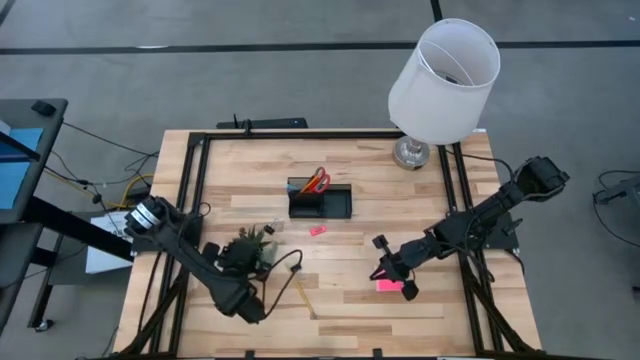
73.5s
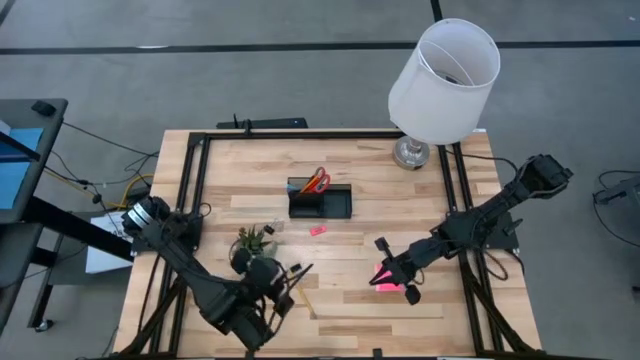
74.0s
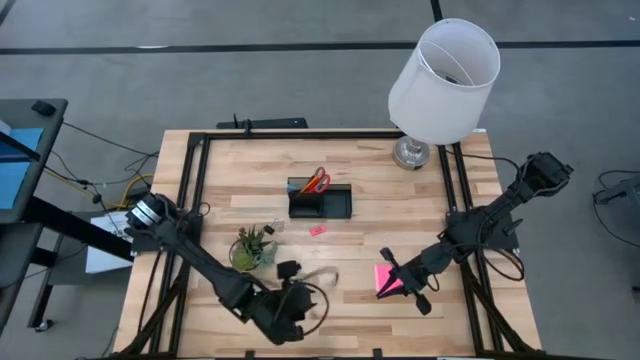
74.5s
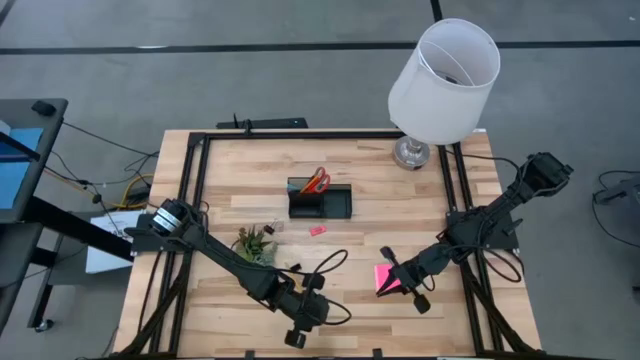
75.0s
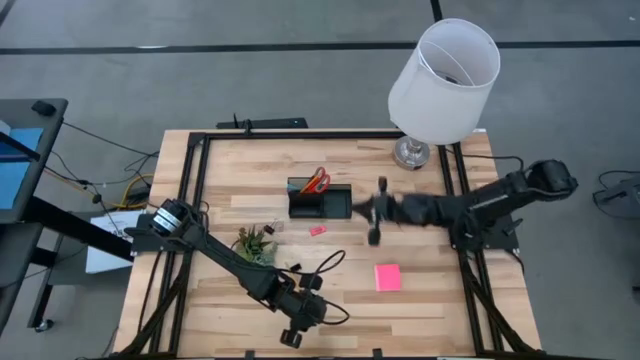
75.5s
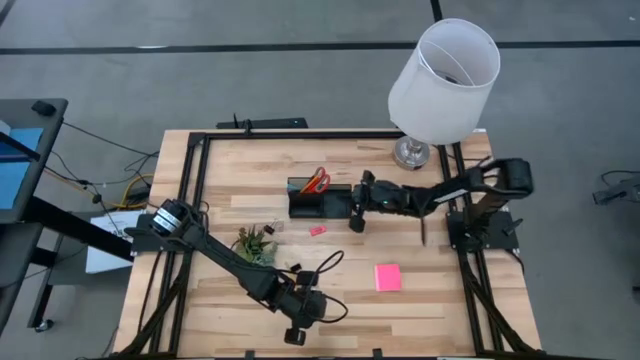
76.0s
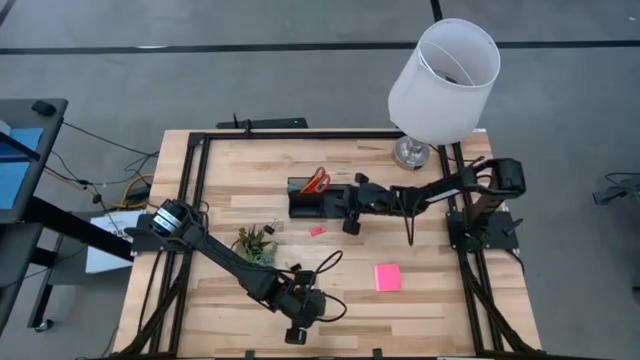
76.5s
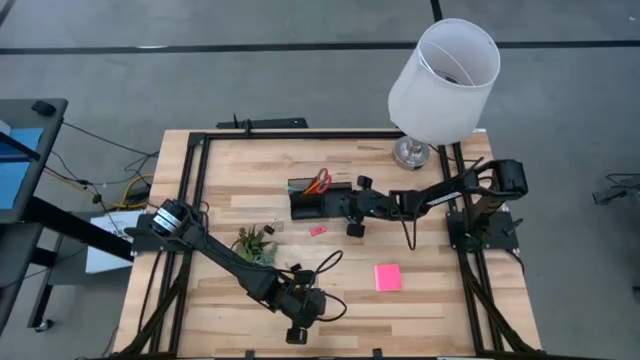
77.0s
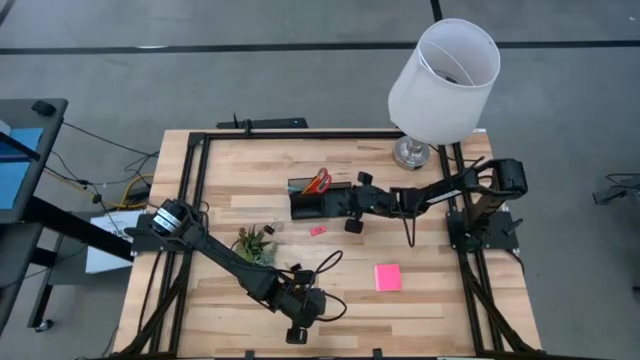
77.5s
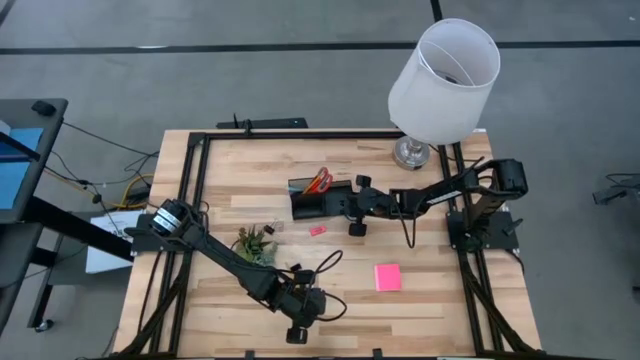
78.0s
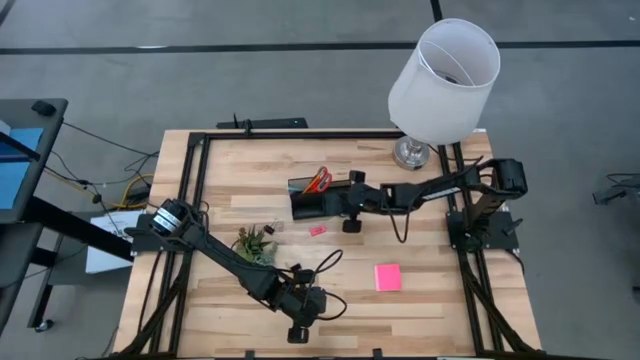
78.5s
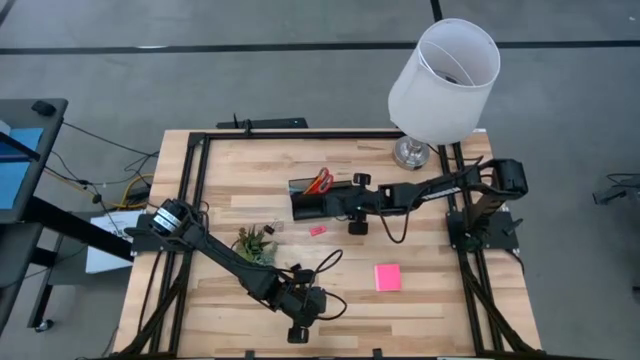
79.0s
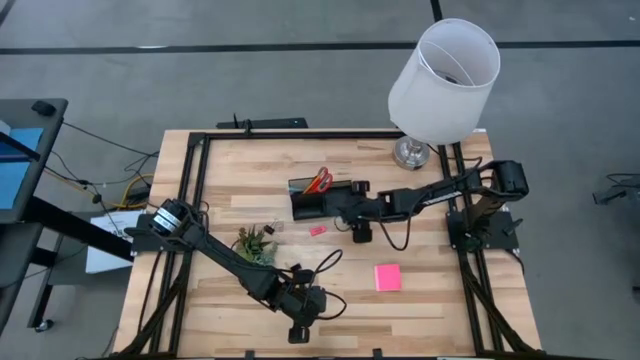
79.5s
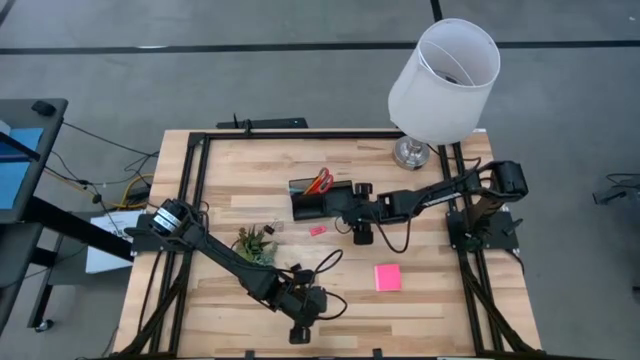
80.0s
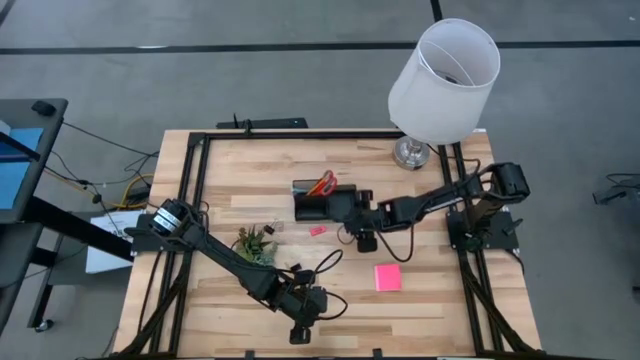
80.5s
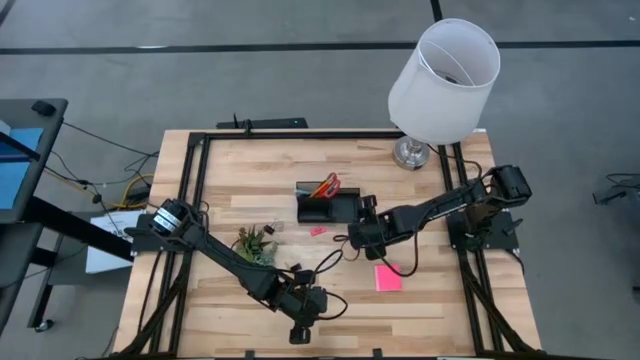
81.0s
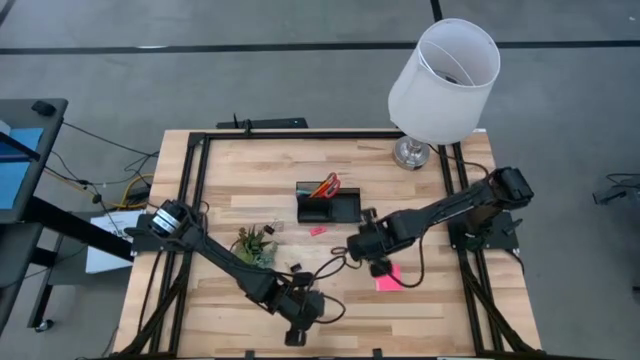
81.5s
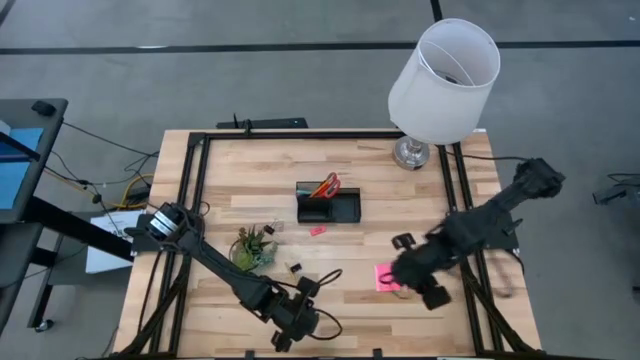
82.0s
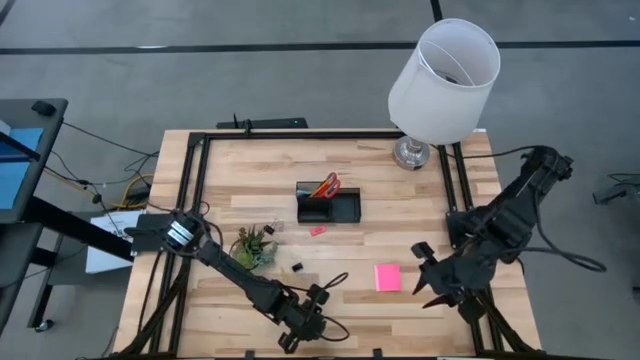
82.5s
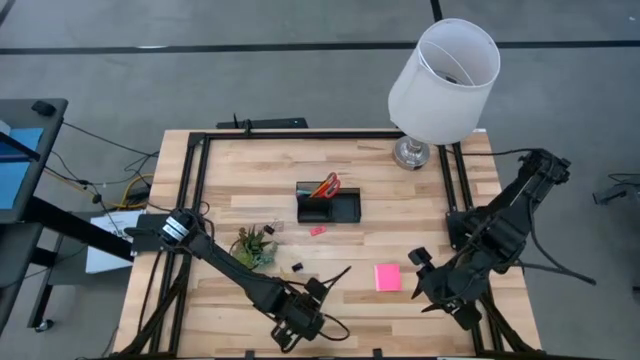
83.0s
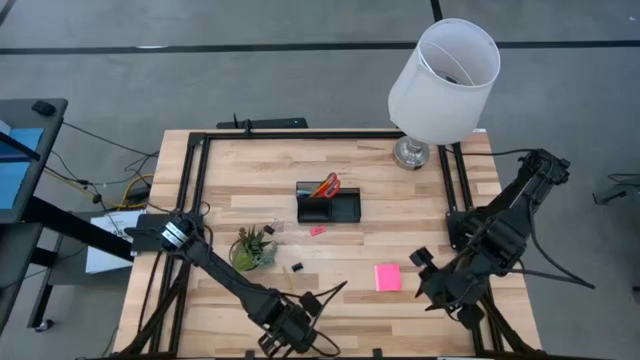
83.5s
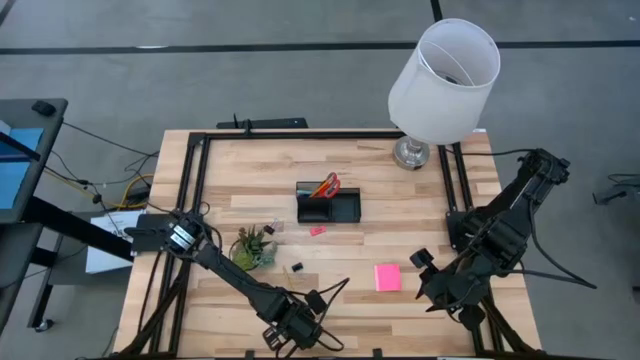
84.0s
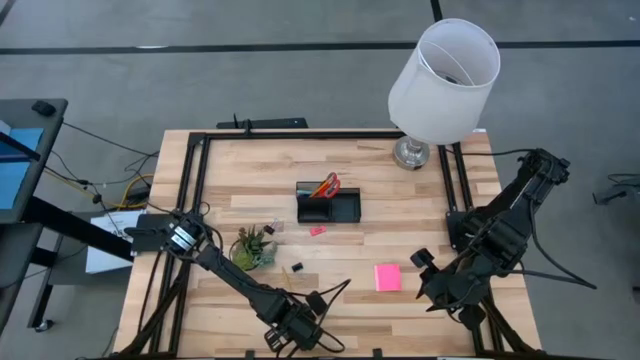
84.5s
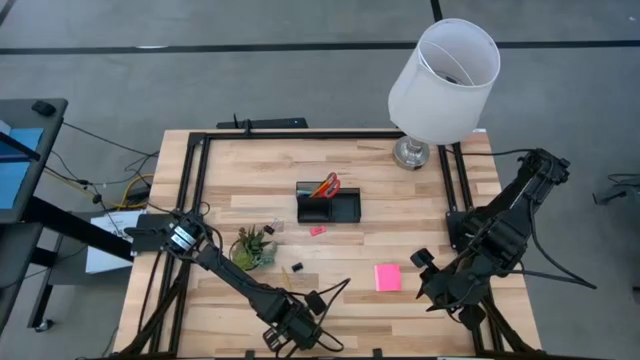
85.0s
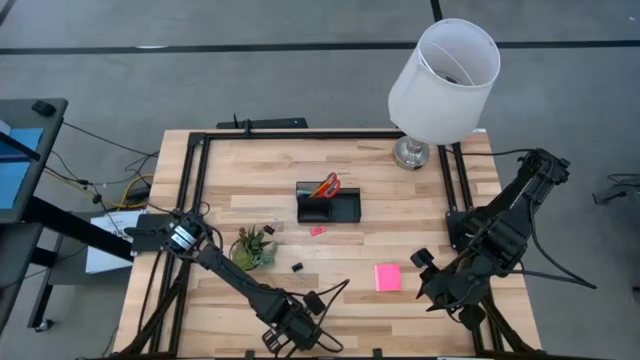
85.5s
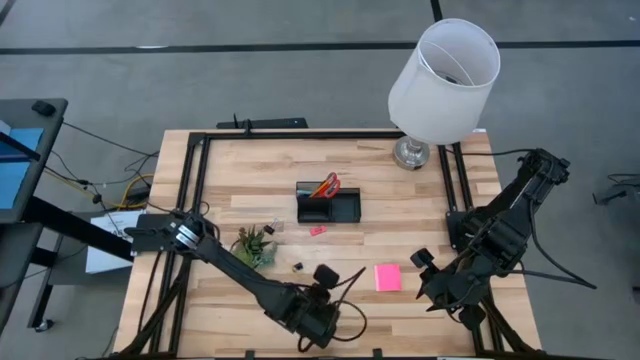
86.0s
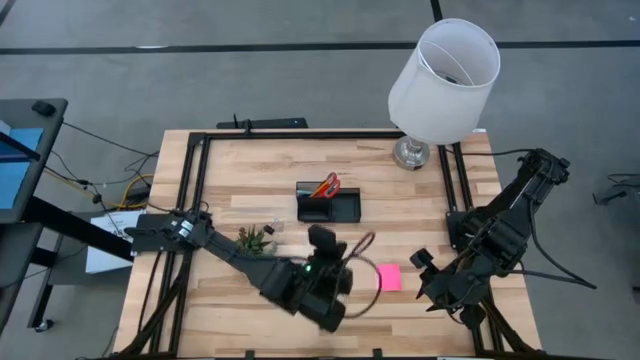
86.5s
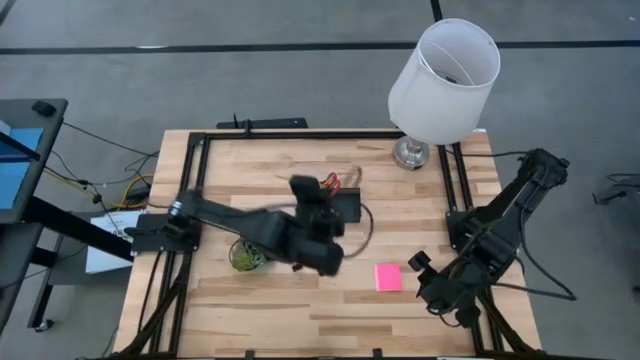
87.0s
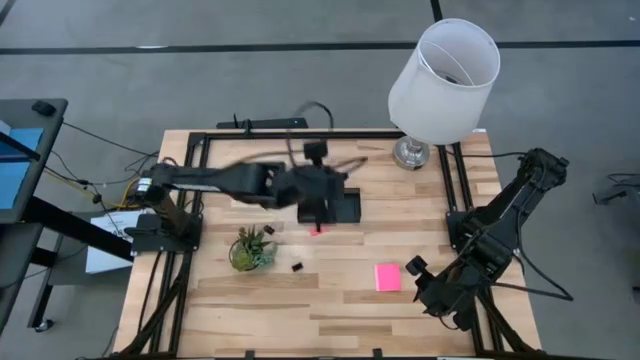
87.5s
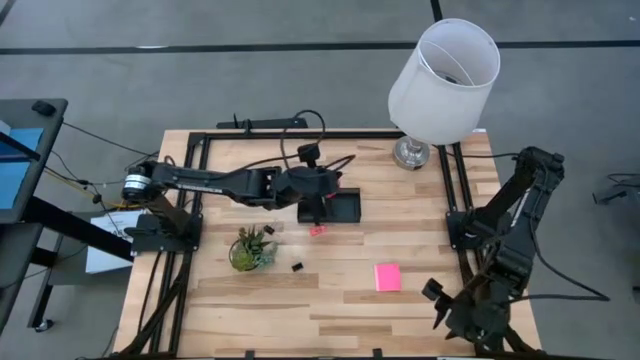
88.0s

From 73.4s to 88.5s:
Task: Pick and place office supplies into organizer
Put the yellow pencil into the top left compartment of the black desk organizer

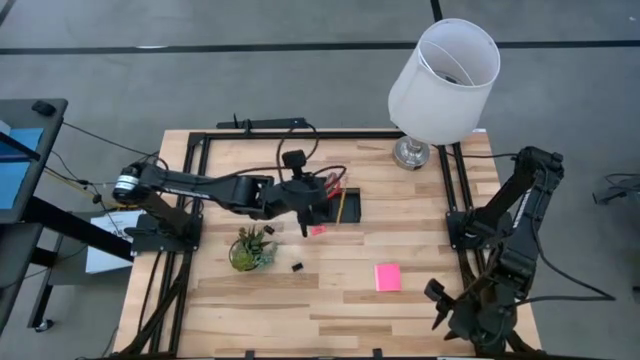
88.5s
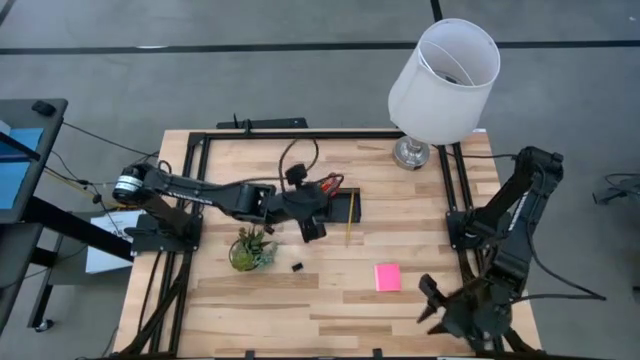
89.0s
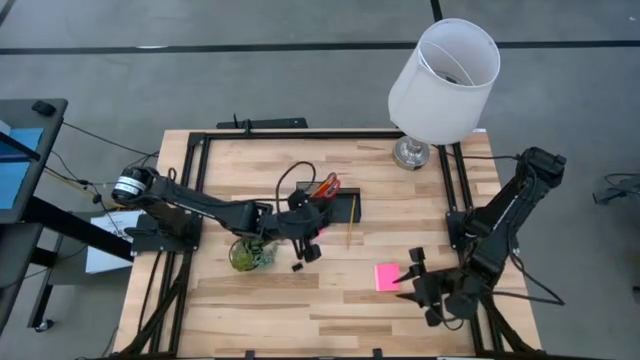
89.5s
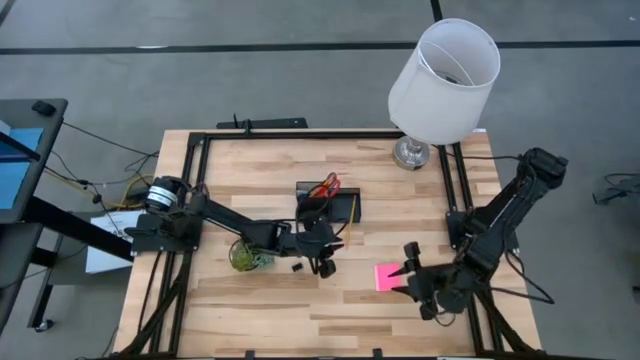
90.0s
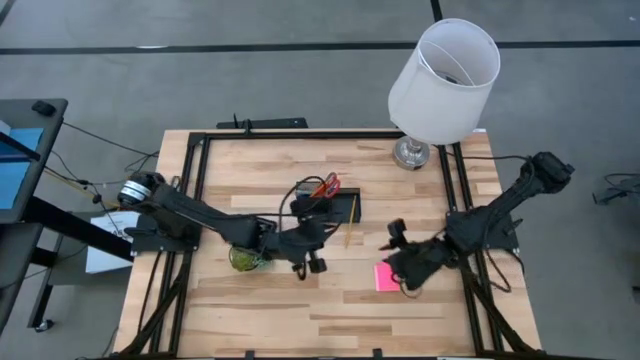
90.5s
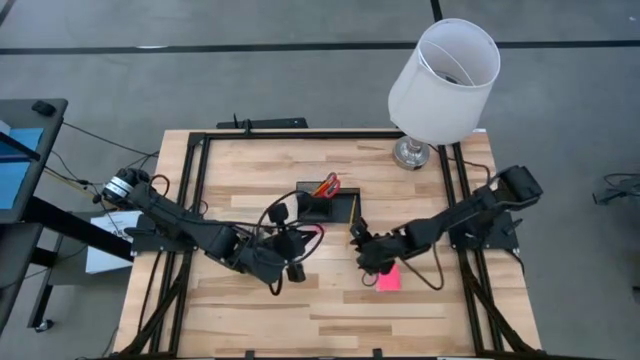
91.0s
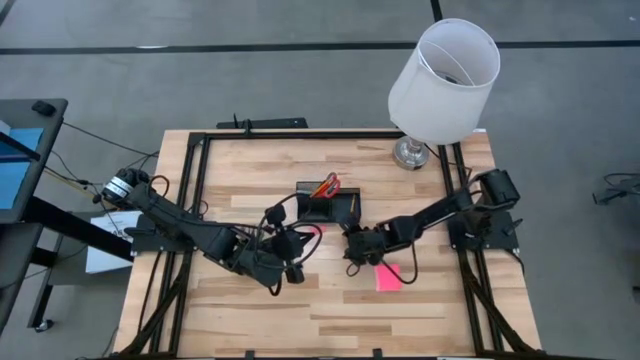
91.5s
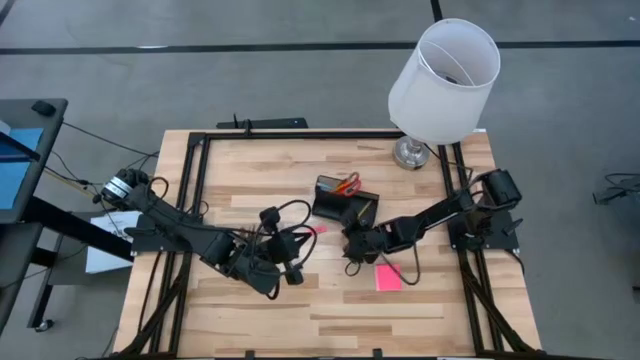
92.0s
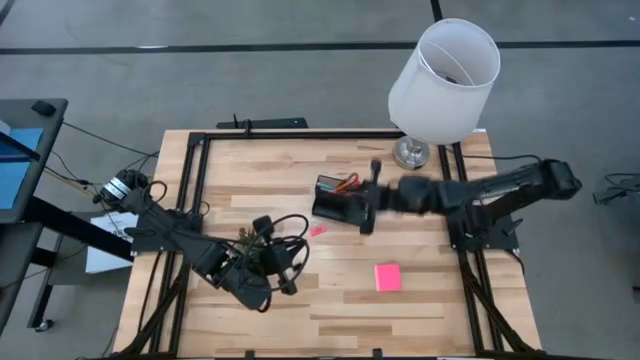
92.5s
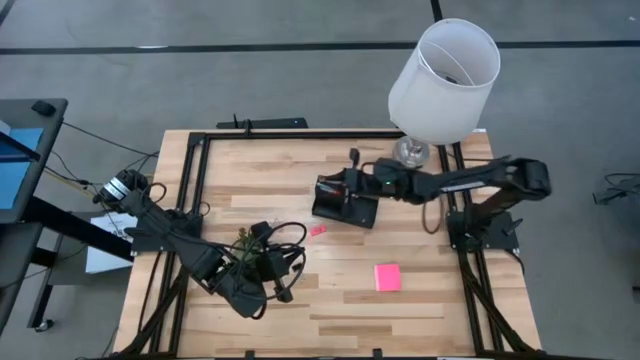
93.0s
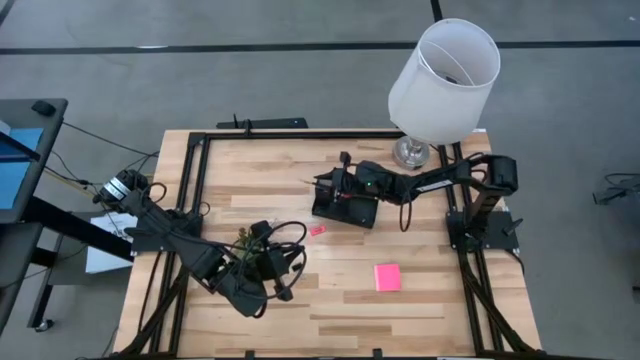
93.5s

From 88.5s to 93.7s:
Put the yellow pencil into the top left compartment of the black desk organizer
